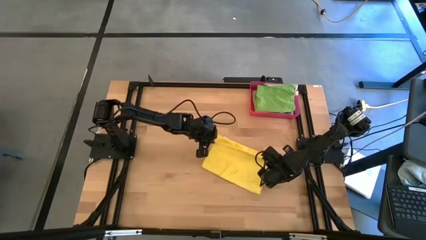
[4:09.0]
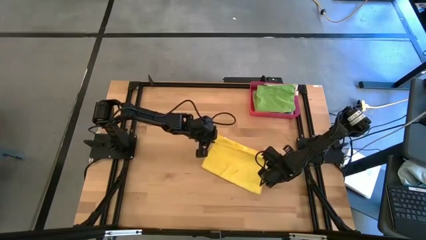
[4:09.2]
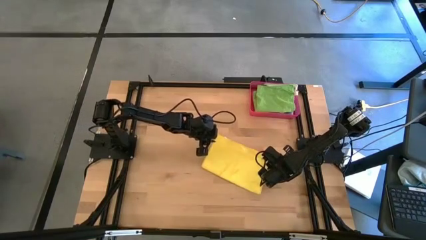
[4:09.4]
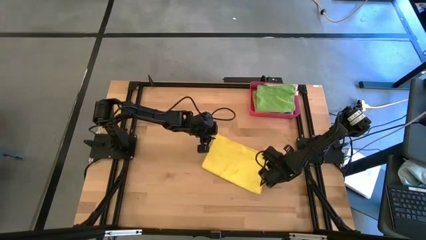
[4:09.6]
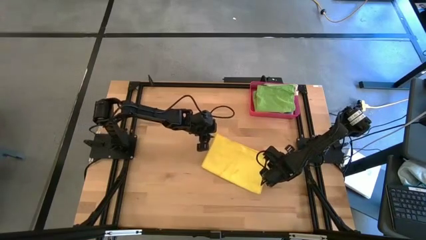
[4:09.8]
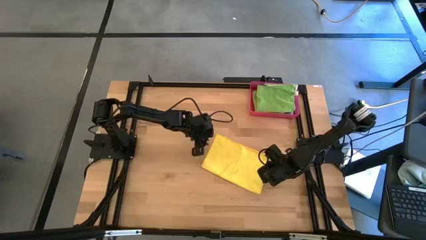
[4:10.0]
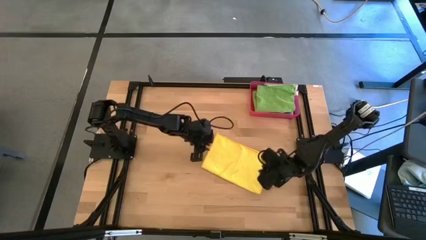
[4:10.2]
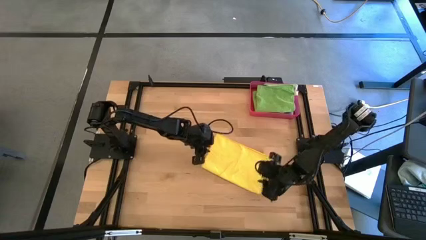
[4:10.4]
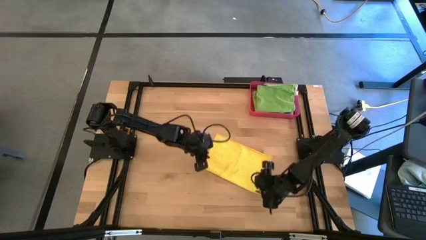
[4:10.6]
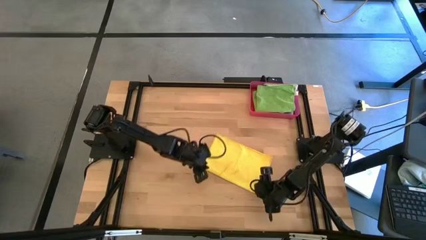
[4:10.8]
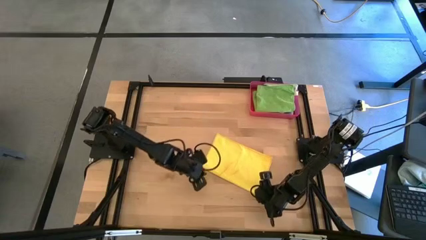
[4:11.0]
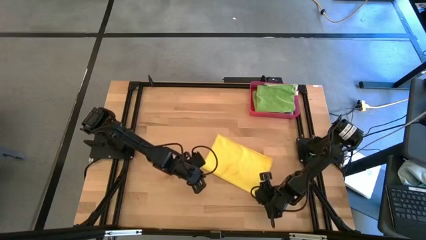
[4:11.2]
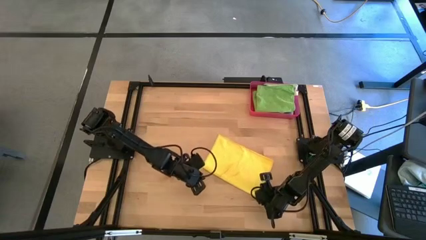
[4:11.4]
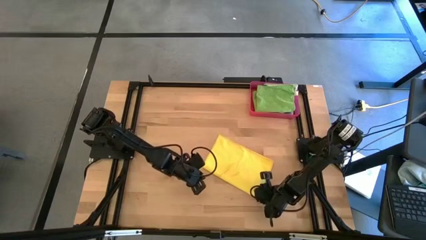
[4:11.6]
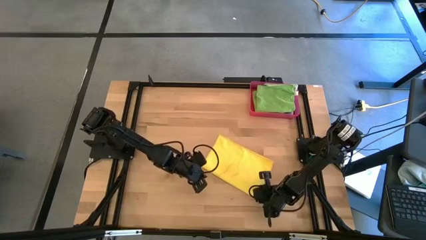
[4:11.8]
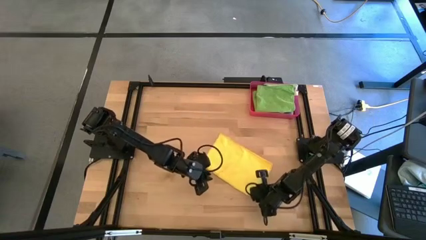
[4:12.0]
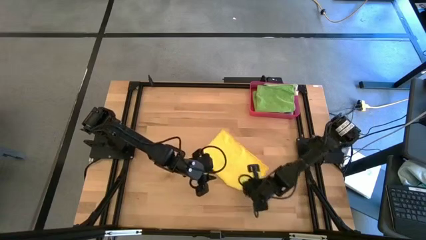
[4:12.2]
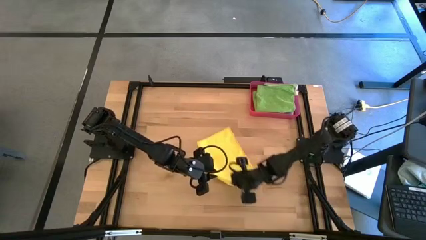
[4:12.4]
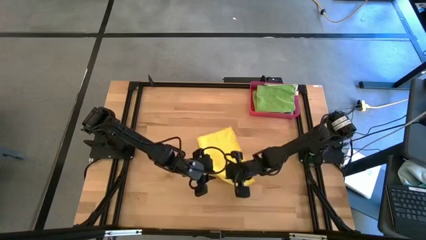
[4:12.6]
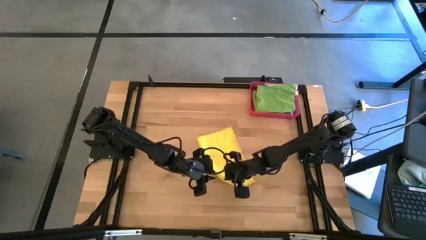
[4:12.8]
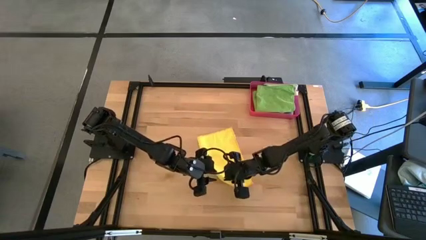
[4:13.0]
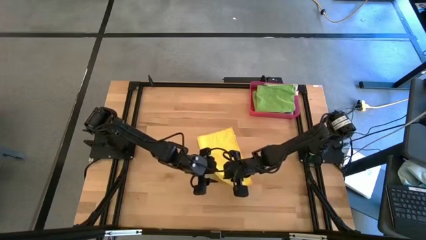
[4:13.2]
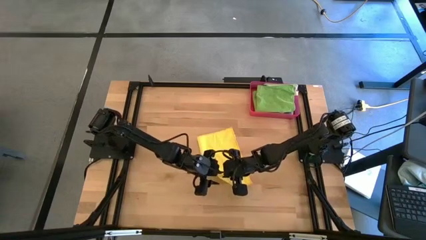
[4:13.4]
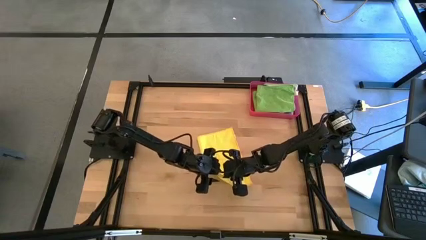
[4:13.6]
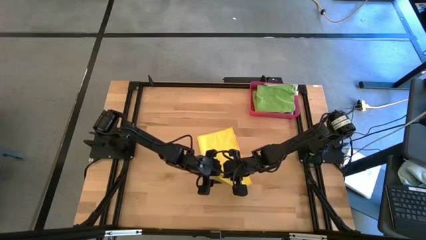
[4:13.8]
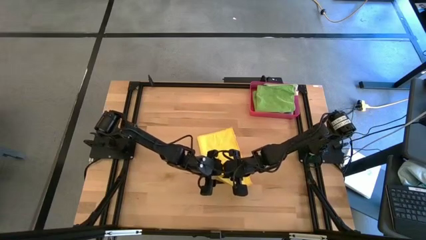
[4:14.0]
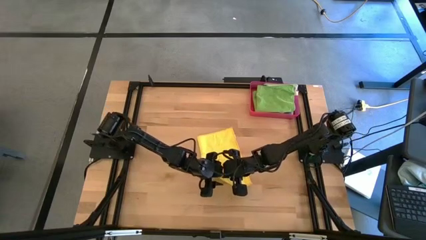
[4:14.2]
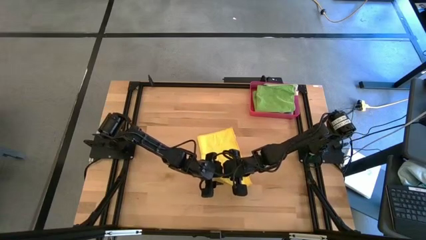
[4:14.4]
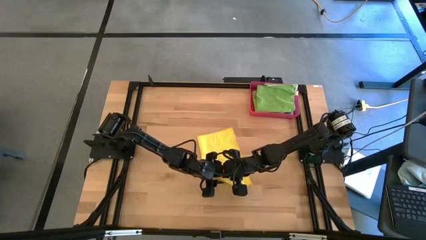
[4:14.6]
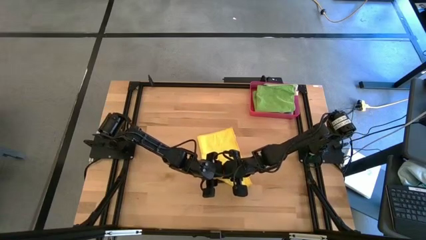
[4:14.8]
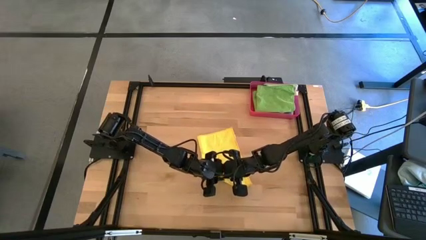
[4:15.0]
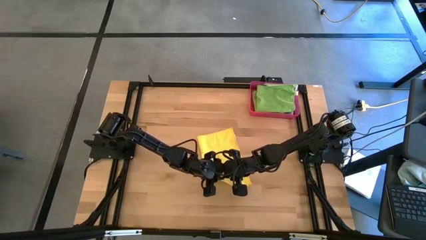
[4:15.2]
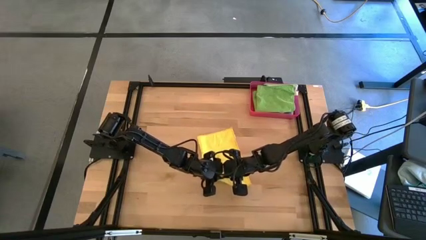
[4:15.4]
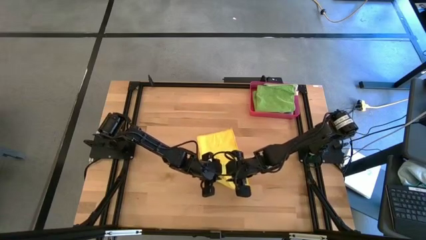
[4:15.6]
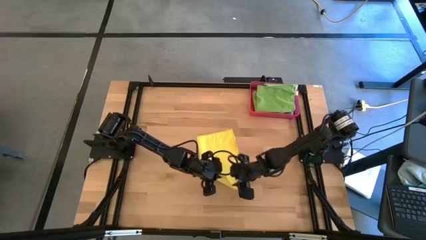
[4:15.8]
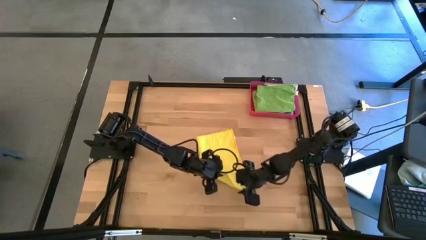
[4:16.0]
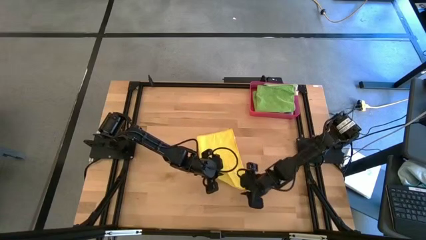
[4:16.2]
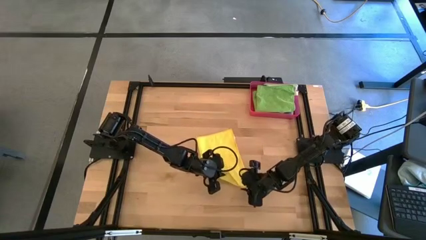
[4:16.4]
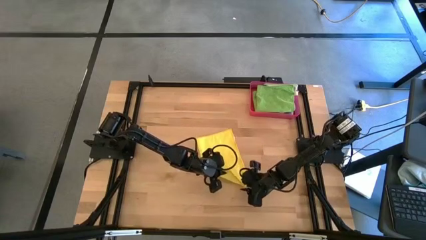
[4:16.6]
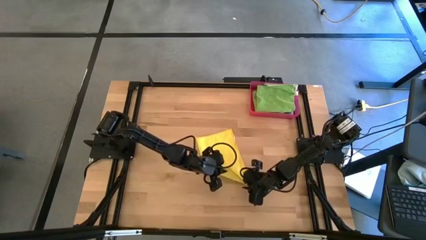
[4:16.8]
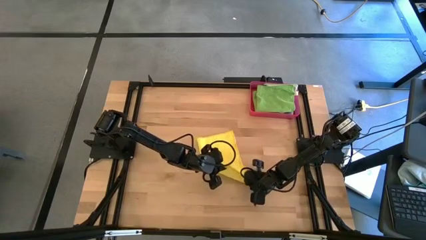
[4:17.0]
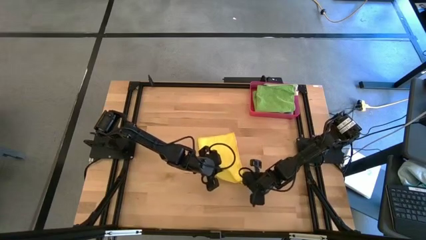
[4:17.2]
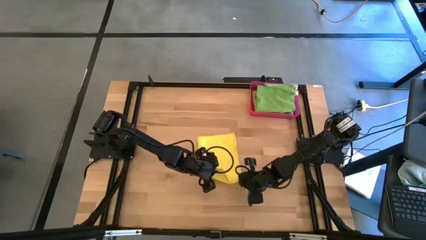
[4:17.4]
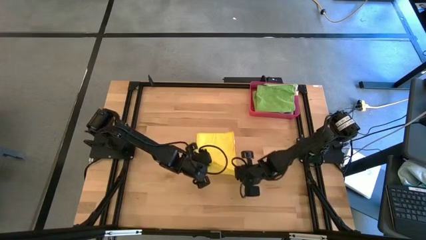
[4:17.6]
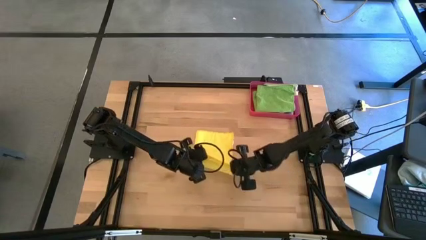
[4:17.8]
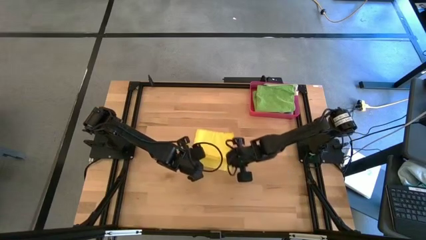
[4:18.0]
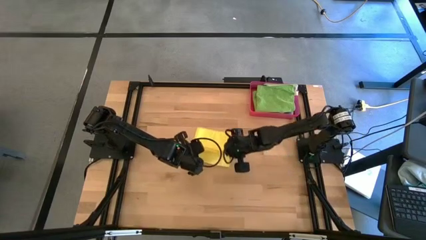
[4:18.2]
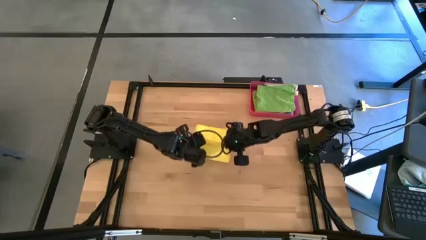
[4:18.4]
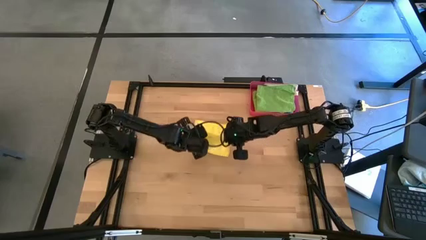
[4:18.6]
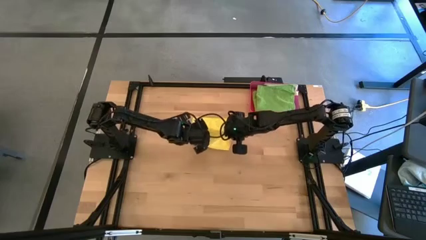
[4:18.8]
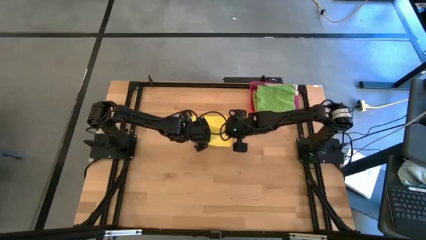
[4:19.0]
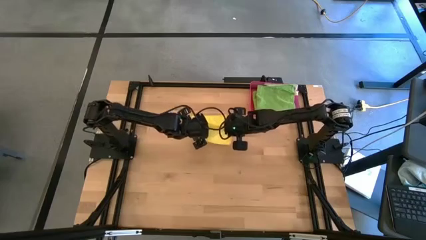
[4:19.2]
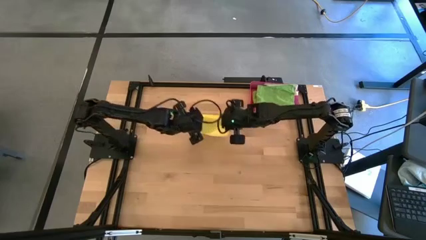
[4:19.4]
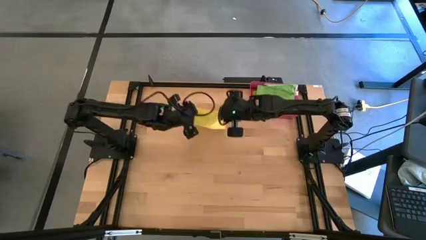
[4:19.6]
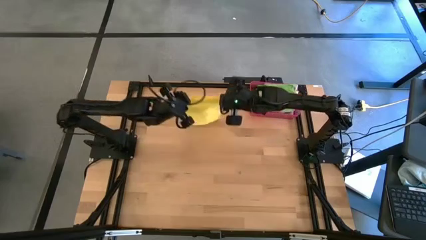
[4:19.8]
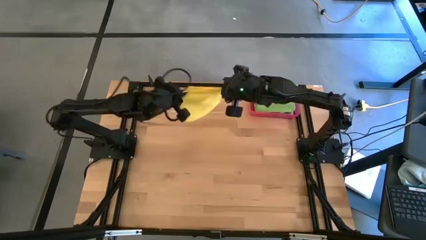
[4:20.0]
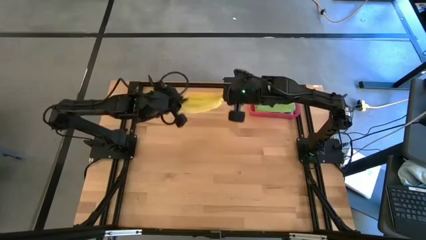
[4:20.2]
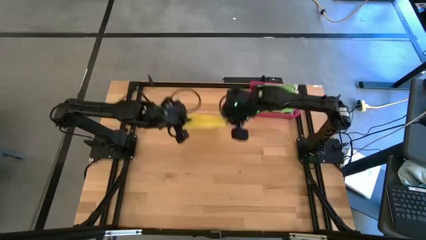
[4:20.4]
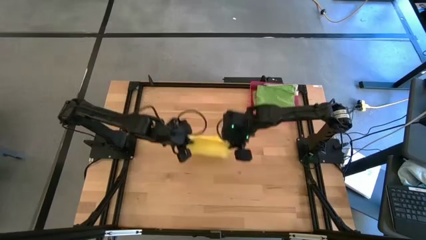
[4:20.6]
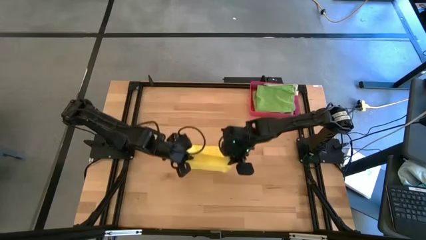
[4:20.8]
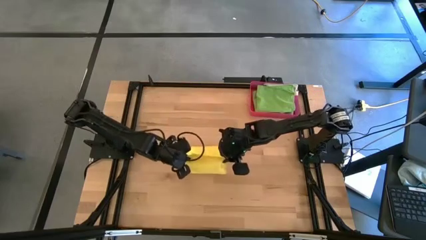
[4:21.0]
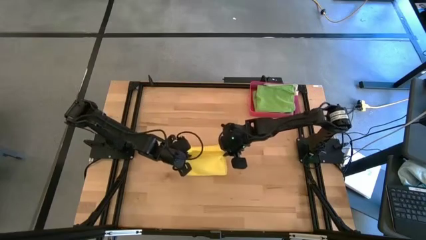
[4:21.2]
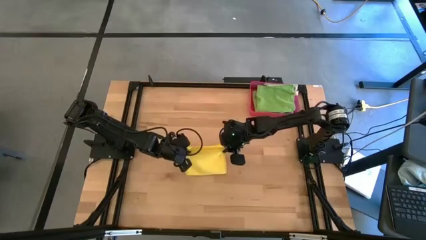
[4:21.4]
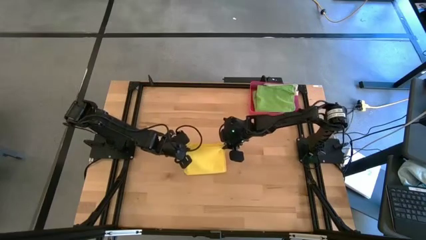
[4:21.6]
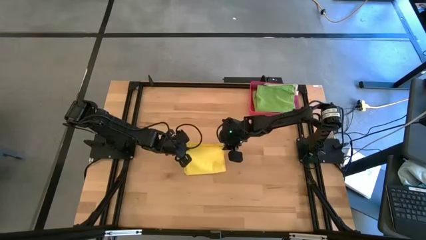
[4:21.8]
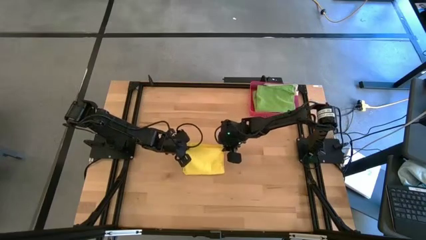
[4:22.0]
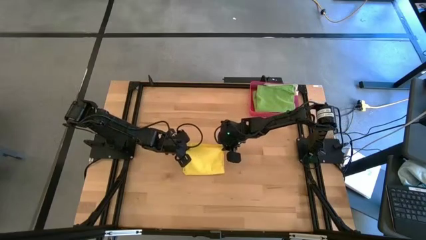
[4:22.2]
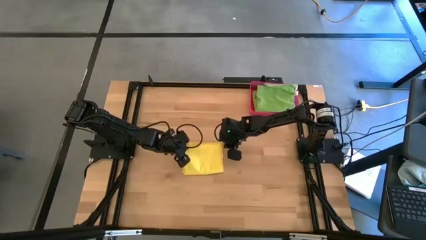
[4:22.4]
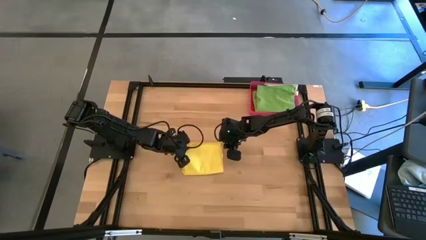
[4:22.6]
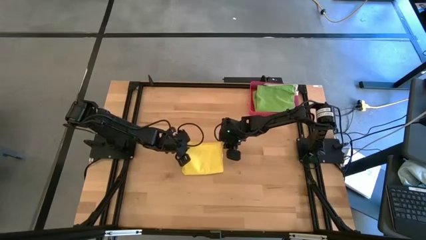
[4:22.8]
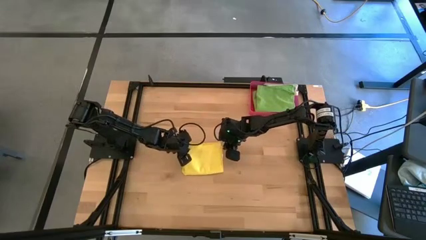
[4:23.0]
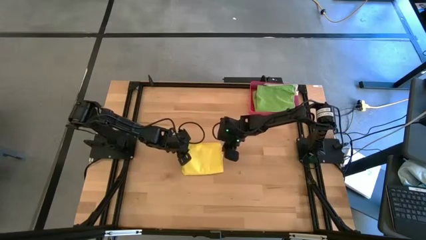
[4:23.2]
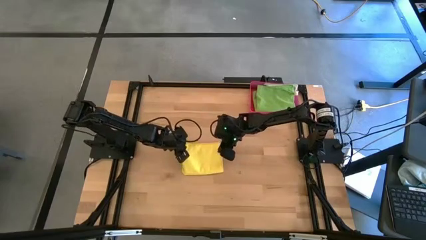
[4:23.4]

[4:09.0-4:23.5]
Task: Fold microfiber towels
Fold the yellow towel

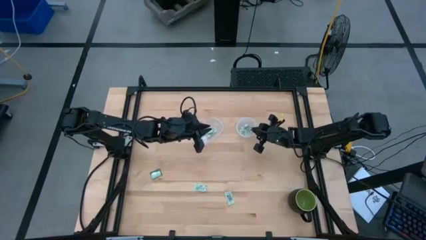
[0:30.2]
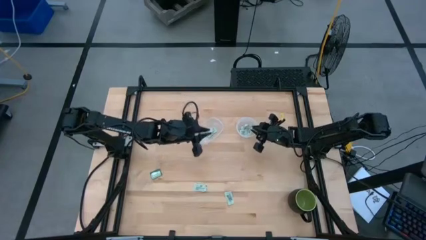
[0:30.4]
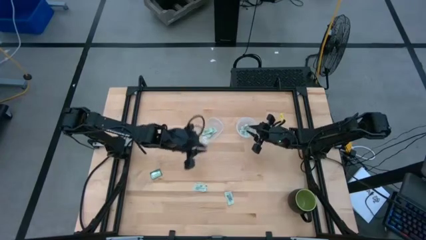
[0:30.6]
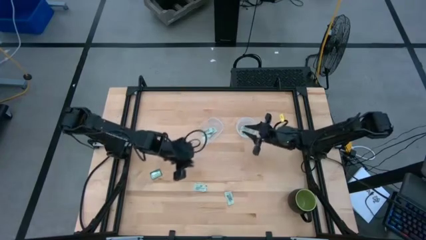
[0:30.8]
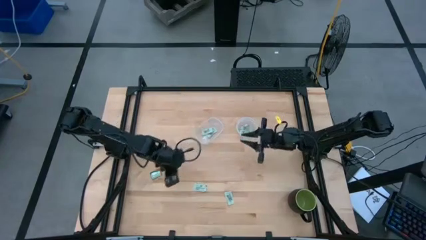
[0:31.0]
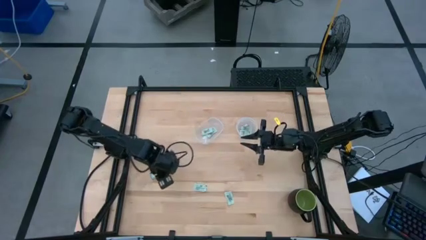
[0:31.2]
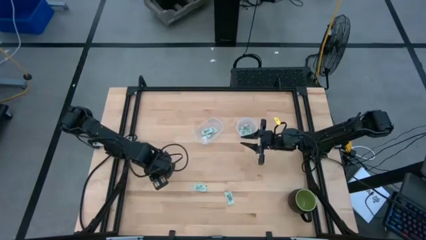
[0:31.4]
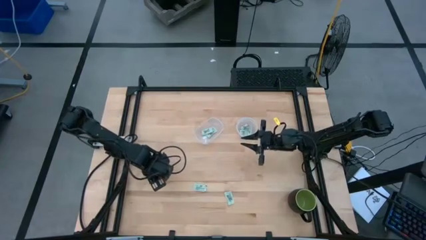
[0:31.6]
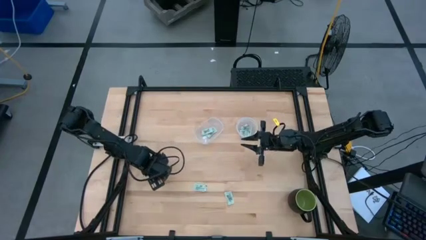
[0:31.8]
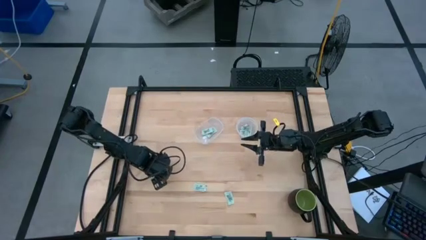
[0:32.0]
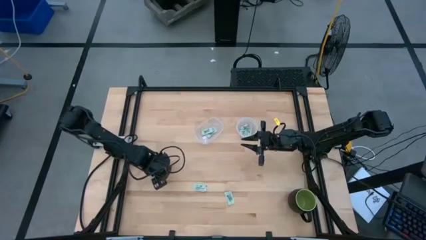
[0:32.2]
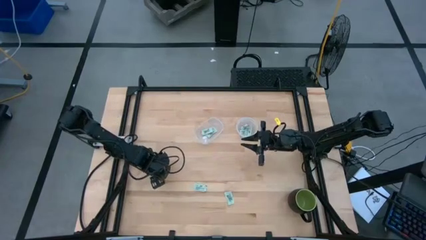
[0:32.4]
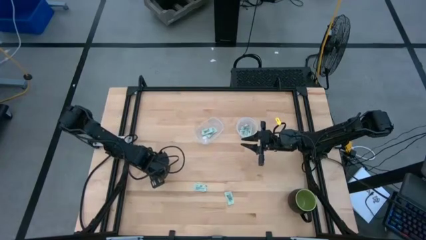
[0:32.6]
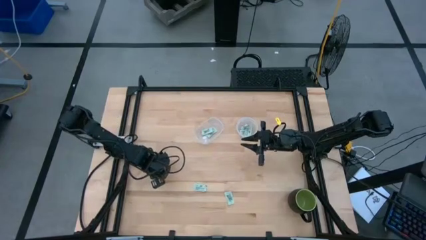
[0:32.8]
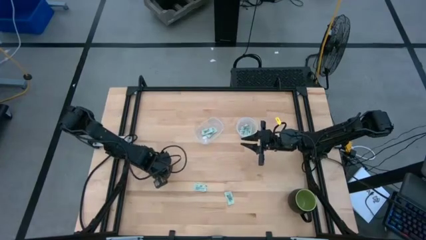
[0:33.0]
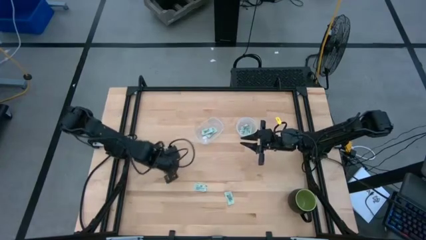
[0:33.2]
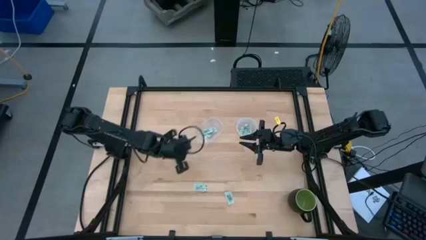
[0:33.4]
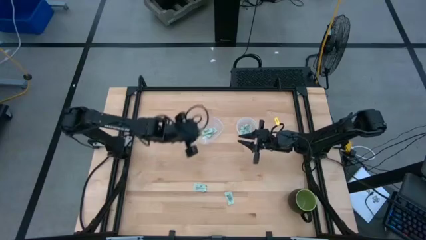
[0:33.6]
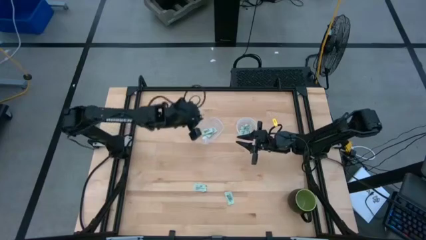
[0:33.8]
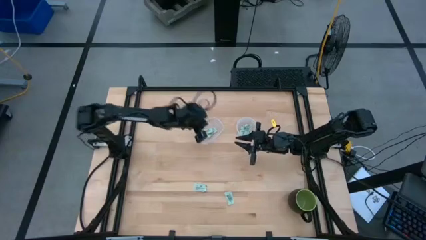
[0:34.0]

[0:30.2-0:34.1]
Task: Pick and place Stevia / Truvia into bins
Put the truvia packet into the left transparent container
